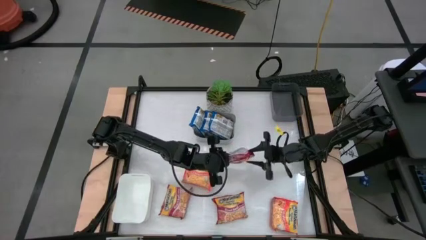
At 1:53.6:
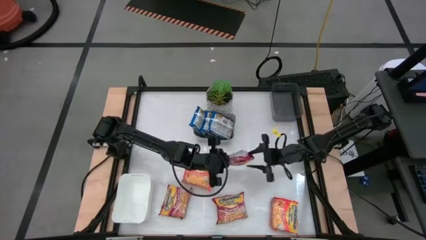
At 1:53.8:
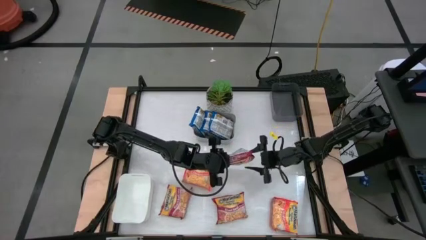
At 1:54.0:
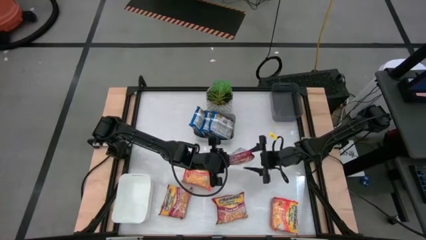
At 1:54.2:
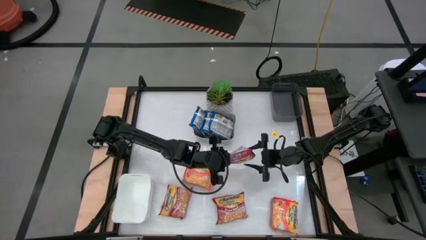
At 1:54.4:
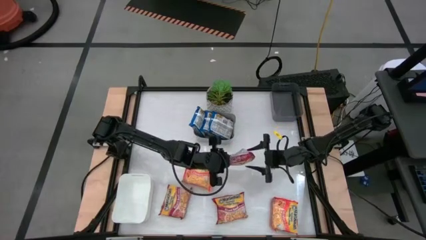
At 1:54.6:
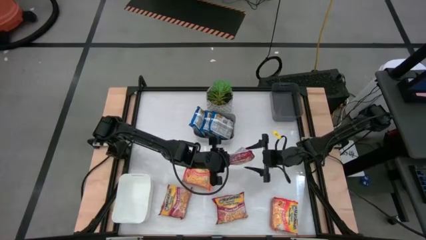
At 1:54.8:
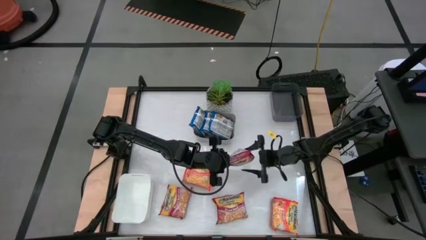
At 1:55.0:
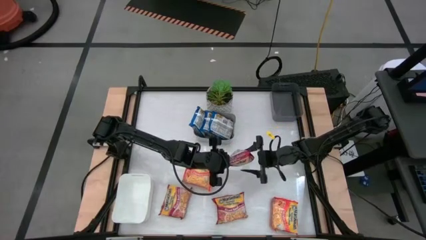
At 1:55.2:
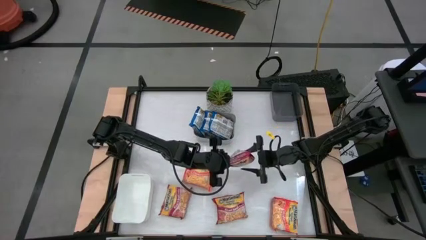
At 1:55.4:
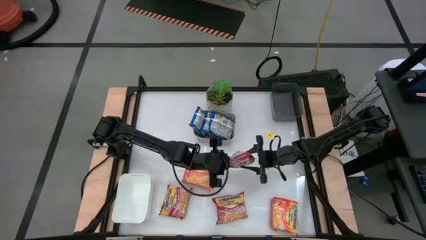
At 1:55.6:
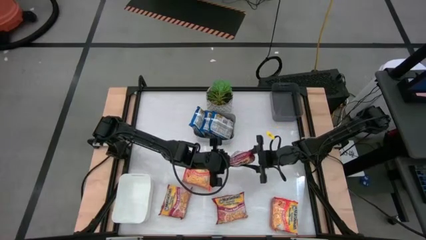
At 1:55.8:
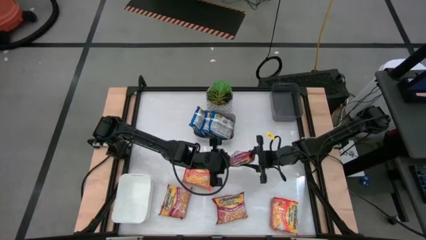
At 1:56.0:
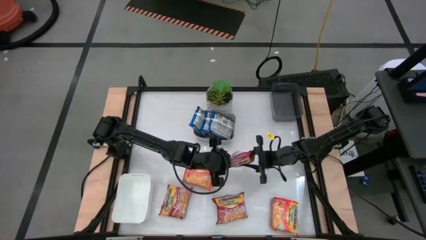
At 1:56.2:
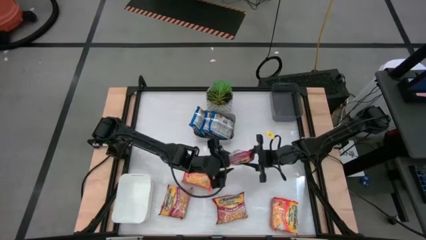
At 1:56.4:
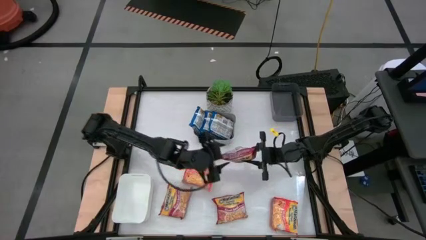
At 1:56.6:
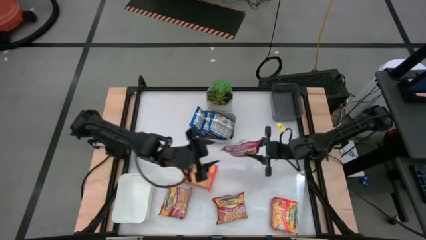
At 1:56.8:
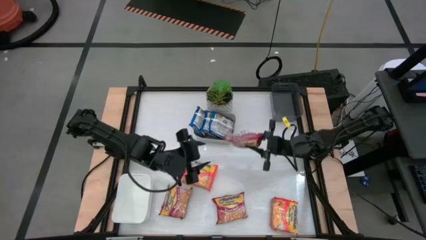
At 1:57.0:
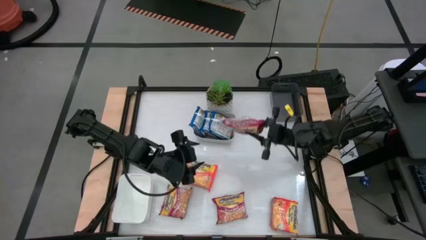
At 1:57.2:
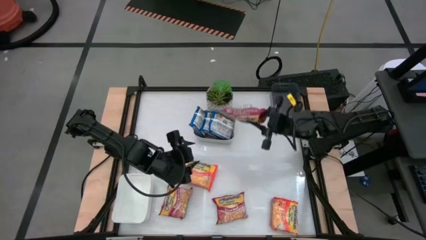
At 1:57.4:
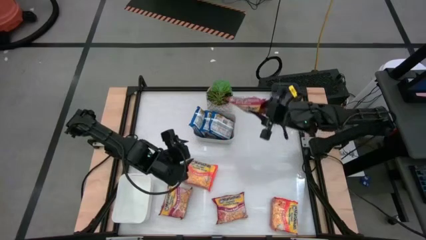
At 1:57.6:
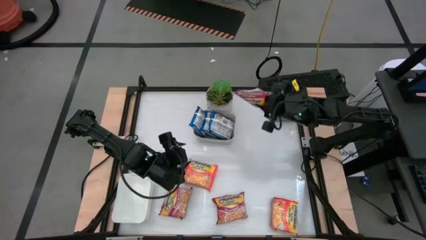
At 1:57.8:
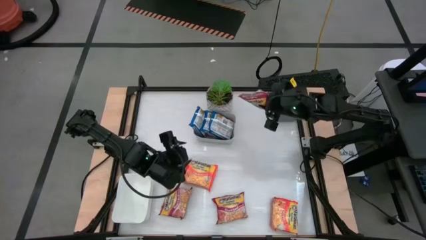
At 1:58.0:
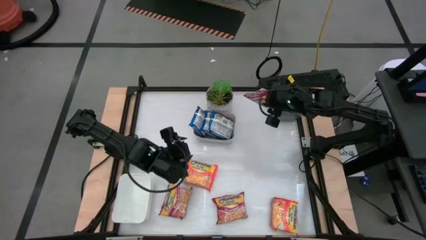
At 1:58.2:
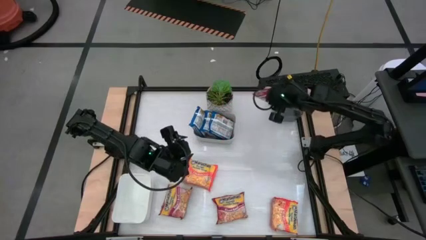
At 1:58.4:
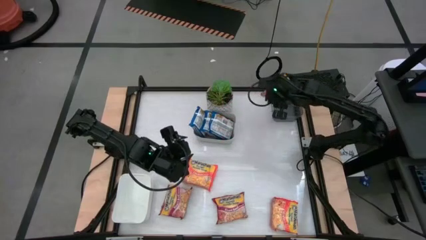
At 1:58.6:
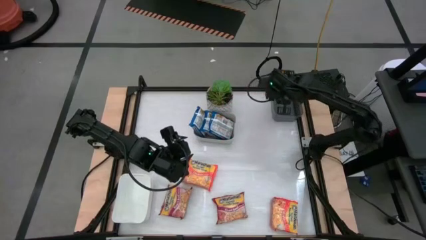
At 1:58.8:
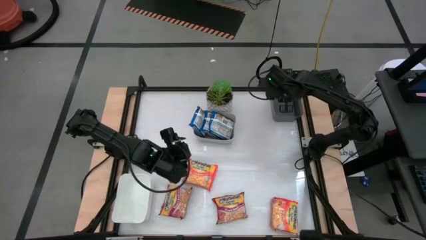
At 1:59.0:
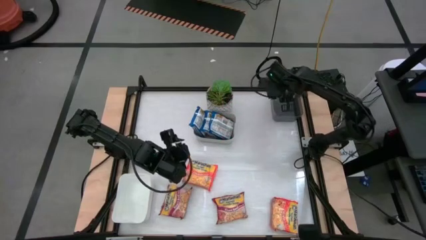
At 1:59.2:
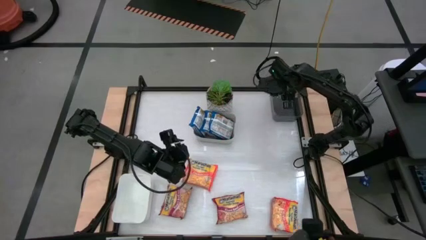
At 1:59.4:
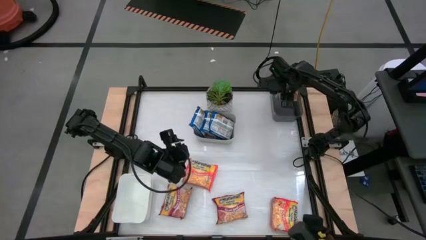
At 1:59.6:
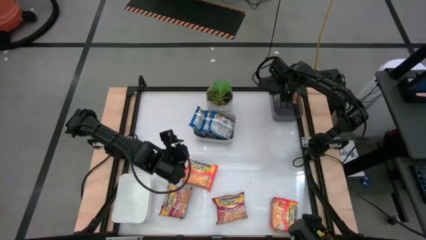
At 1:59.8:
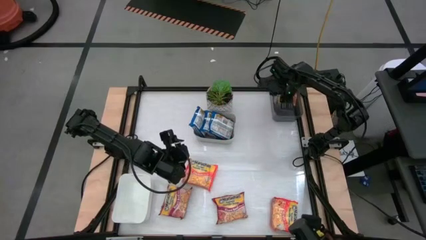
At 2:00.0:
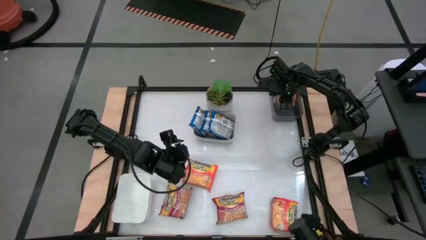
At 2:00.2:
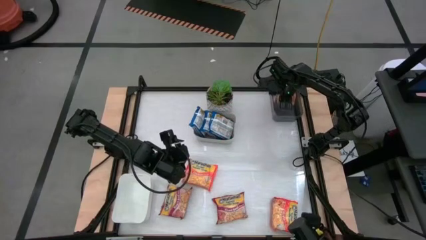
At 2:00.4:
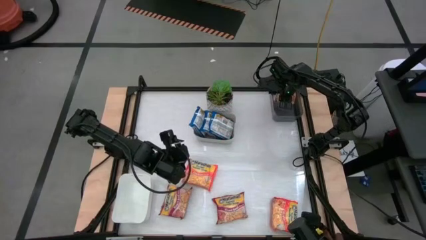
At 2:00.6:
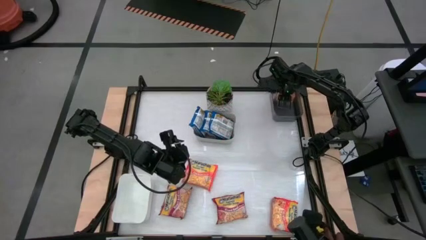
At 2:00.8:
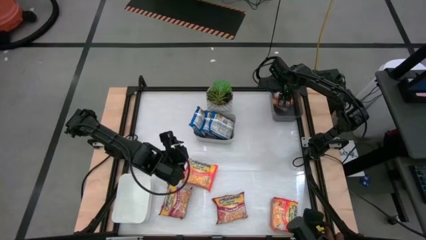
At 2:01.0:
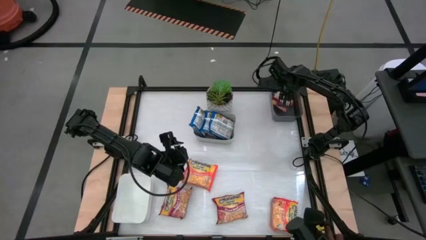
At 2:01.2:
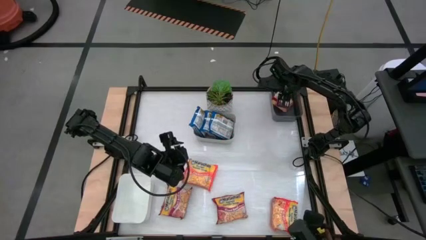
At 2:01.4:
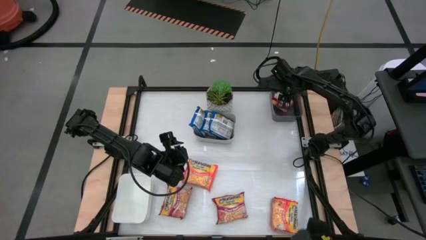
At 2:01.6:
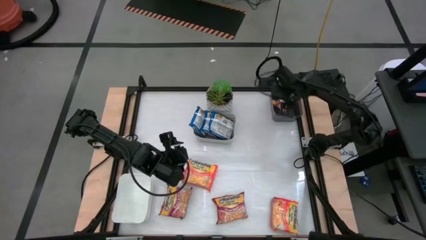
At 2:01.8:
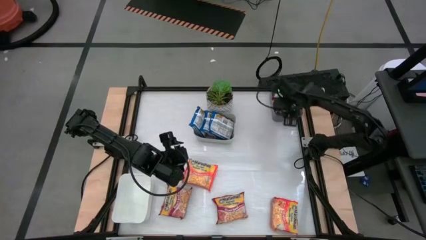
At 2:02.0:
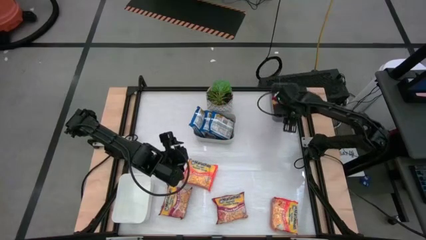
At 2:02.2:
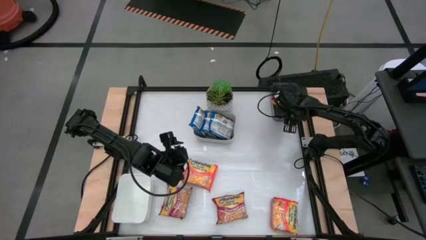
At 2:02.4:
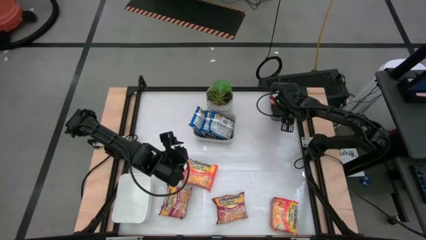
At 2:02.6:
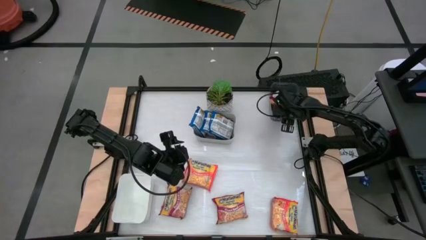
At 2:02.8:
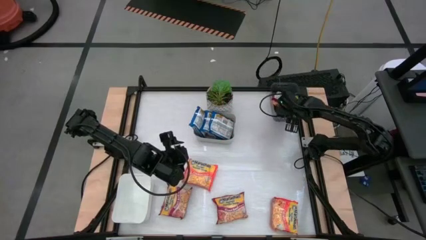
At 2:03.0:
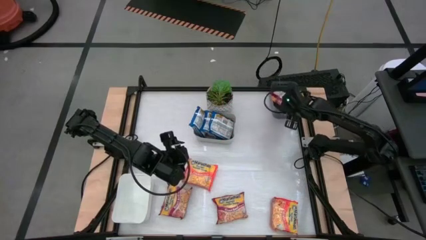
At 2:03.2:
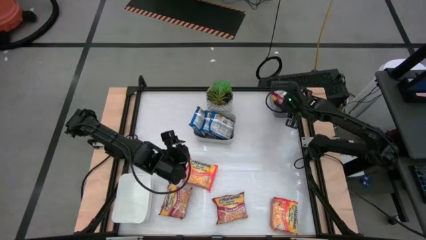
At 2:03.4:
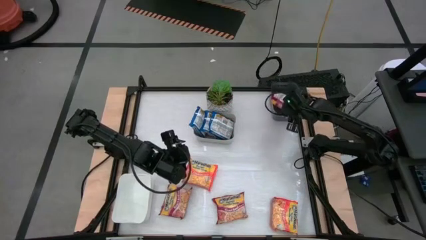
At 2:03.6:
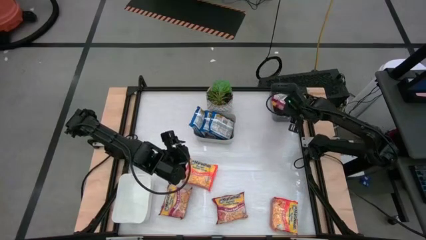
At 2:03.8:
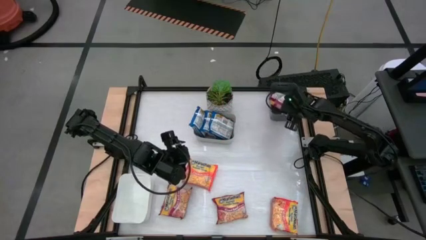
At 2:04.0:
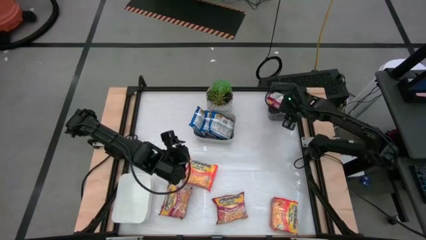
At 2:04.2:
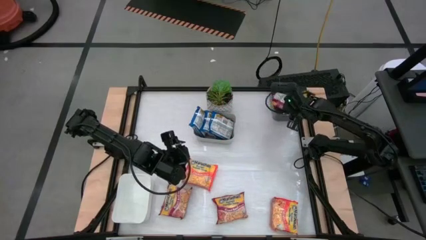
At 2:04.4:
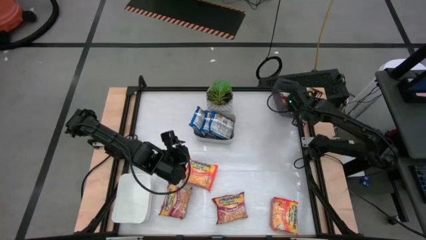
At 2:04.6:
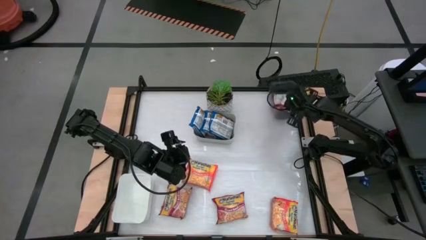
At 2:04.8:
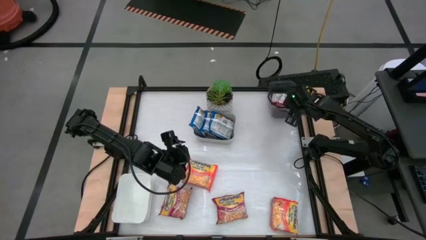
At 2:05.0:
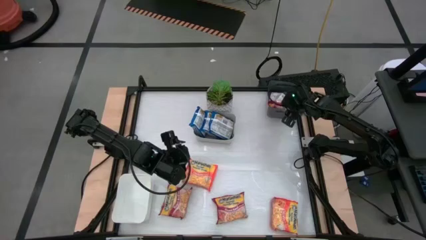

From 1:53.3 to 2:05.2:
Task: Sort Maruchan noodles
Put the right red noodle pack into the black bin
